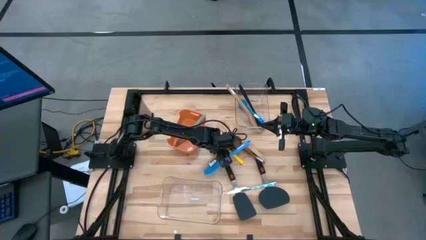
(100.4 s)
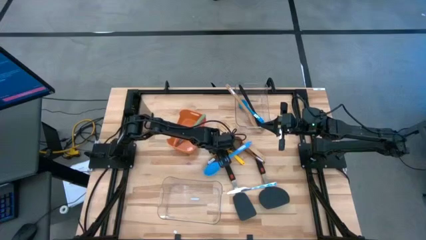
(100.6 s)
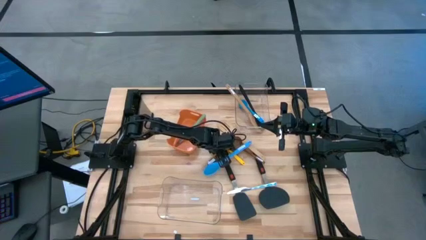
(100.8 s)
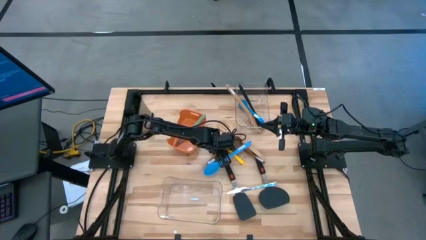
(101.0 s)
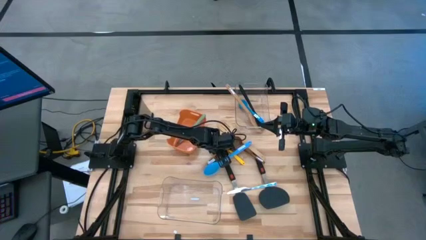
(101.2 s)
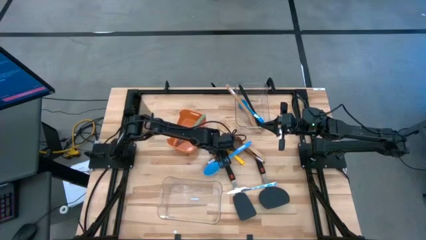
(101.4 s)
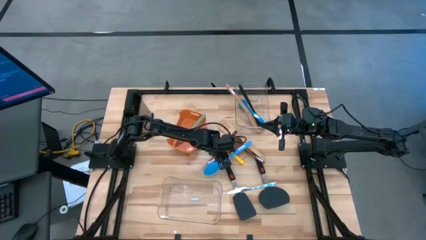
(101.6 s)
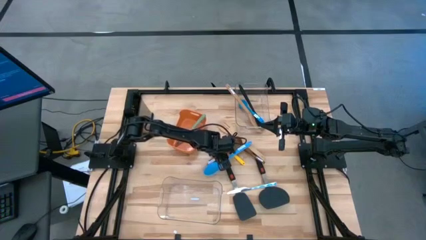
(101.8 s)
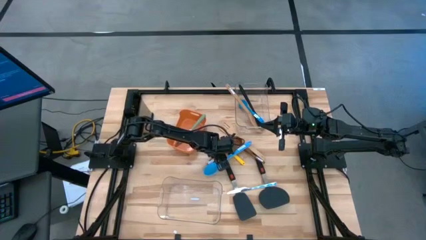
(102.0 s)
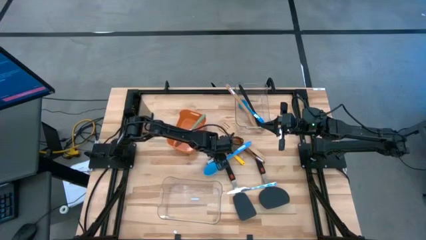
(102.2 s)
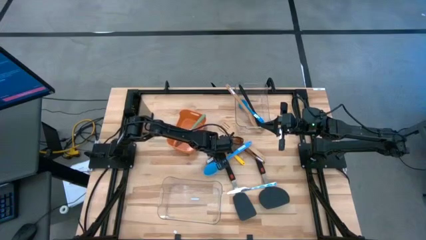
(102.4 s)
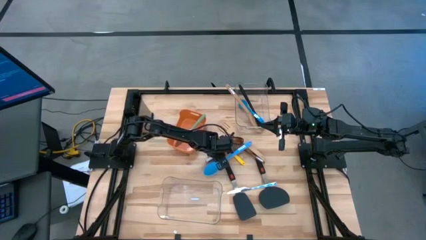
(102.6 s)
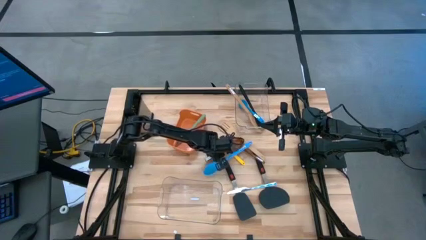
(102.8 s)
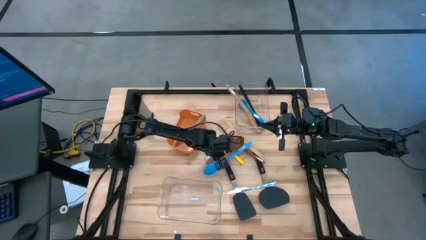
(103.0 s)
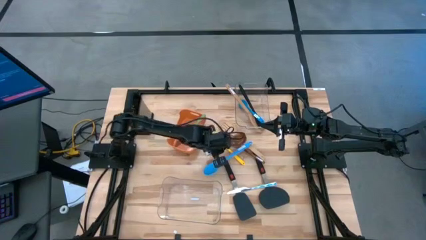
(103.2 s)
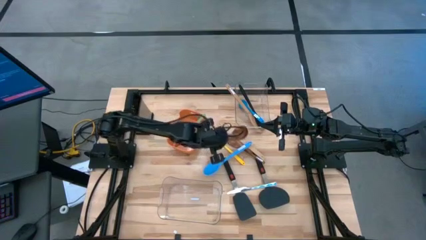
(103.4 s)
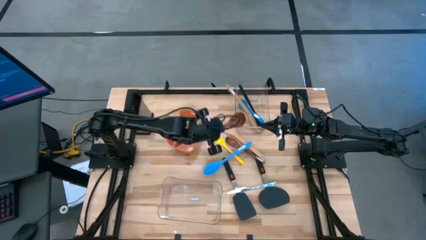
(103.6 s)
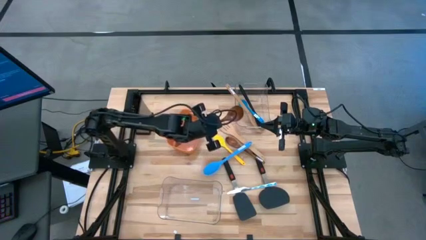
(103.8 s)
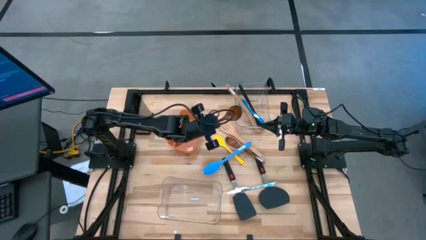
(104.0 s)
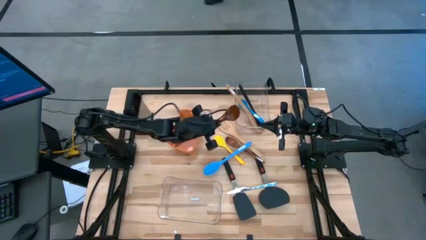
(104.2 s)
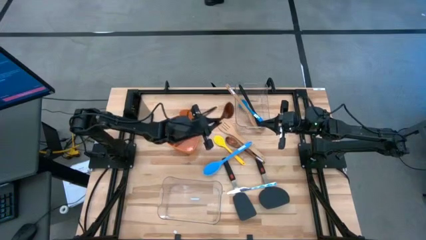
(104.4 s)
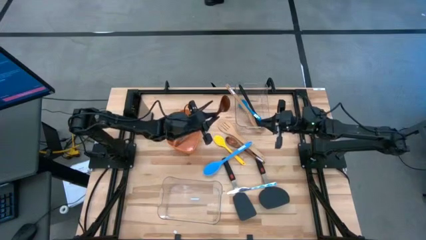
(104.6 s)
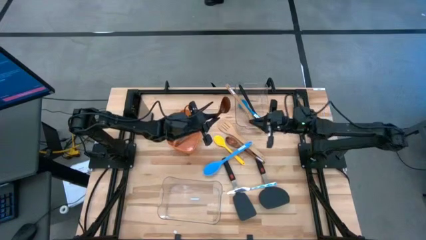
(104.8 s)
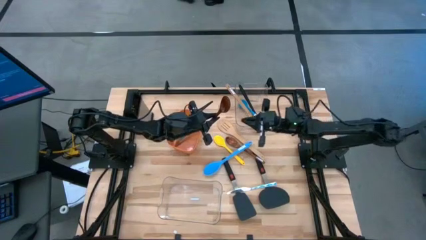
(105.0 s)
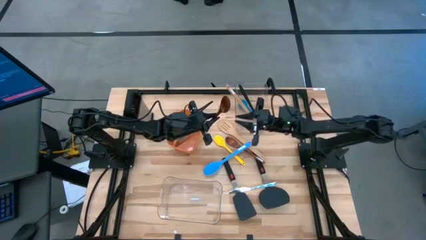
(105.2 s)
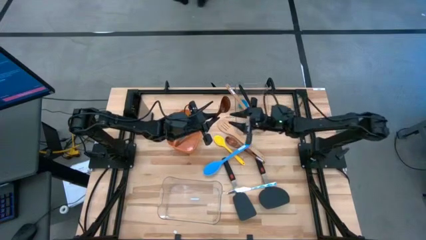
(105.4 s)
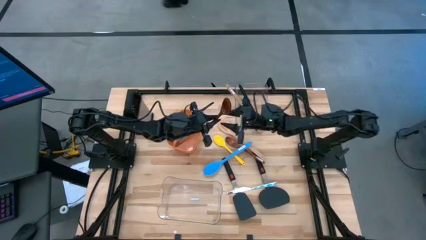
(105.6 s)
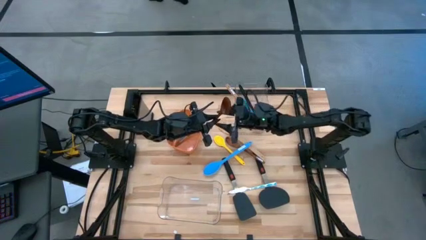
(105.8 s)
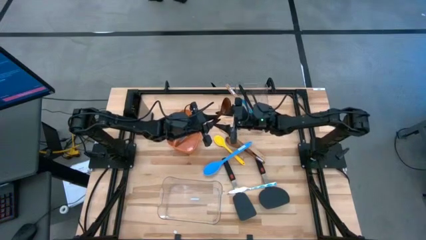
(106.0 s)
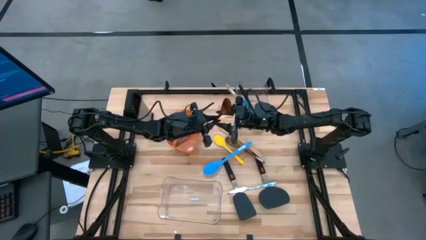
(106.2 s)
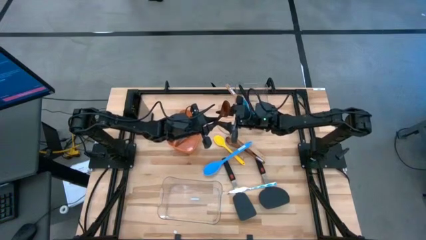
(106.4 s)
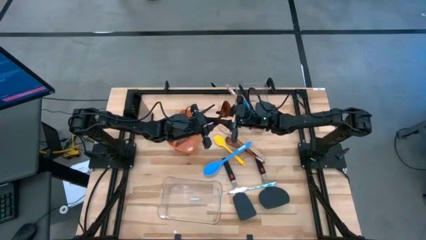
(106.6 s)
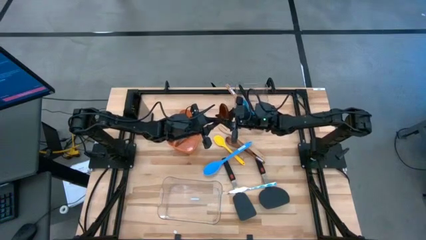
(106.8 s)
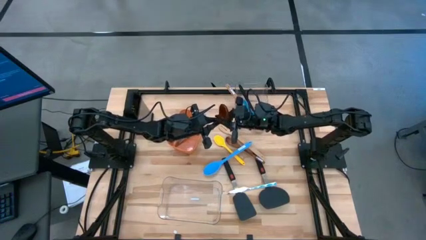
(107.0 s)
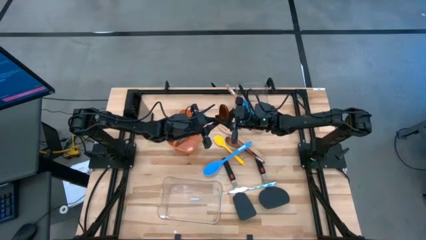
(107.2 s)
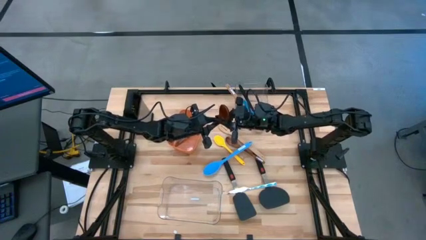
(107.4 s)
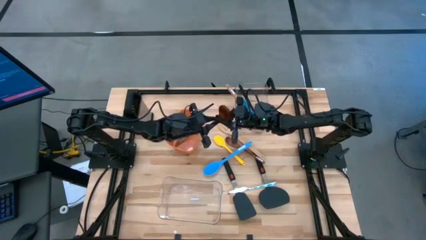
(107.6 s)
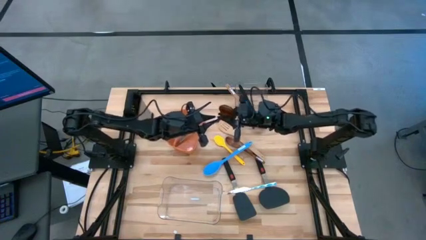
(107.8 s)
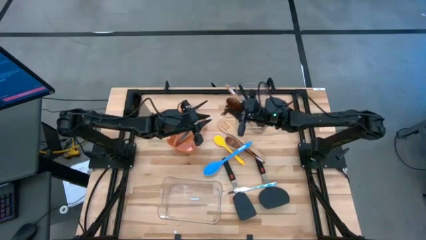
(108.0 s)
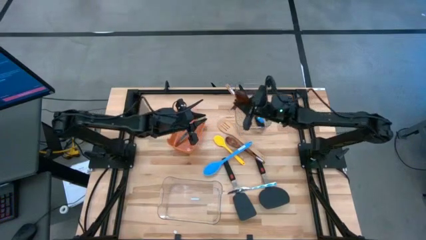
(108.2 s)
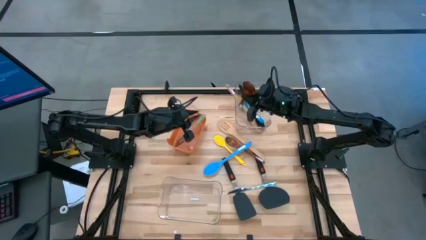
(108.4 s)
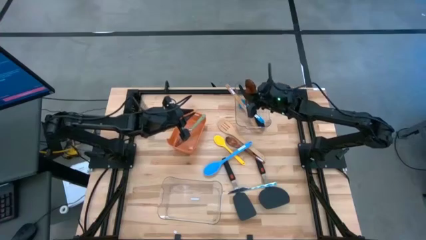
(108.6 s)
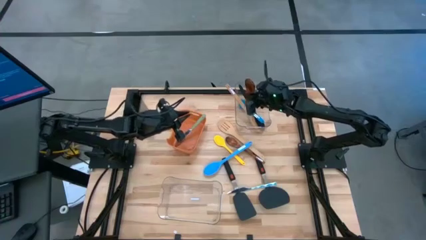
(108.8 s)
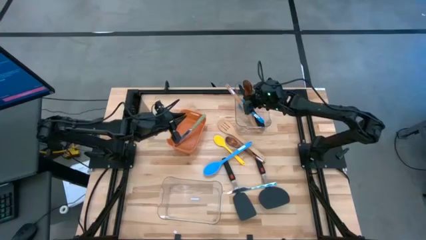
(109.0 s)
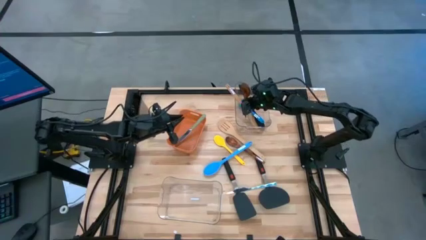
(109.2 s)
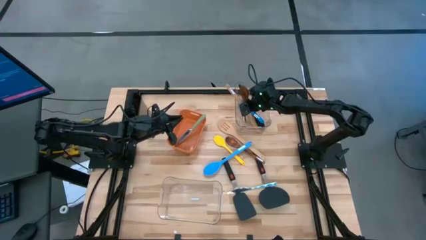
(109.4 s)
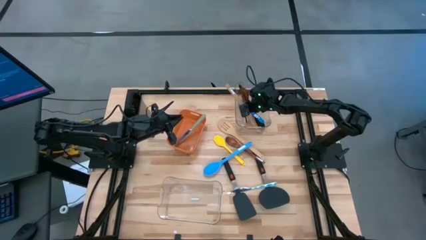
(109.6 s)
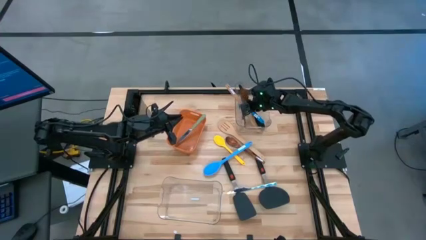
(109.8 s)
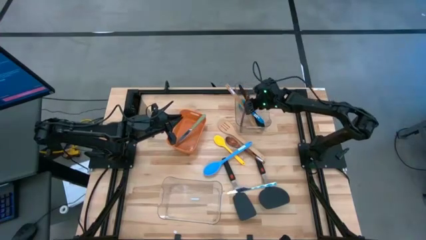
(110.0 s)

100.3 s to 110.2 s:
Task: Pick & Place Kitchen Items
Put the dark brown serving spoon into the top transparent bin
